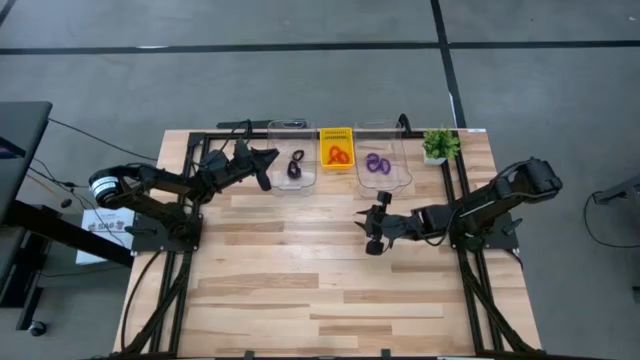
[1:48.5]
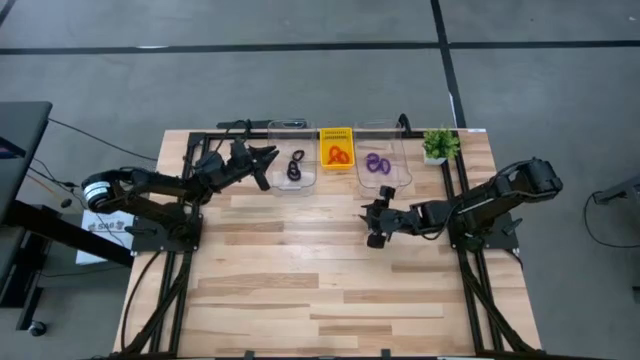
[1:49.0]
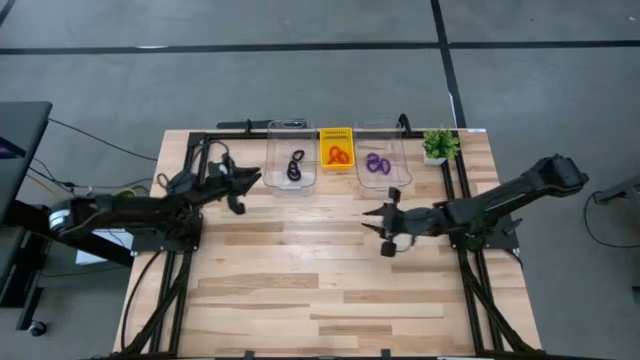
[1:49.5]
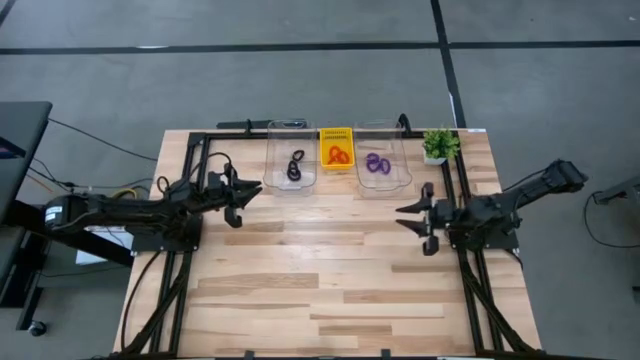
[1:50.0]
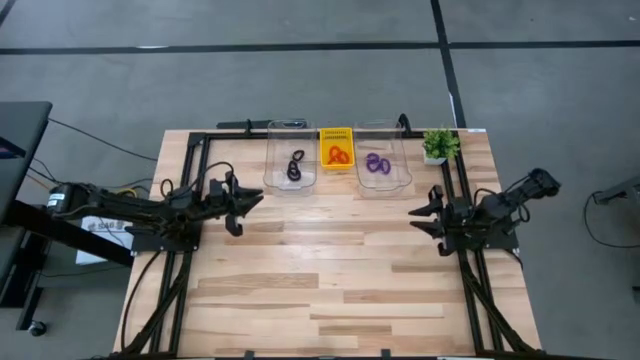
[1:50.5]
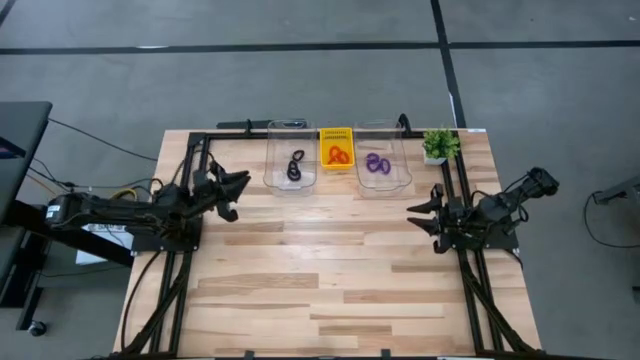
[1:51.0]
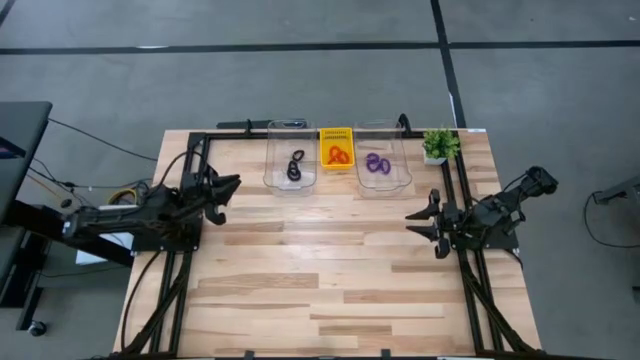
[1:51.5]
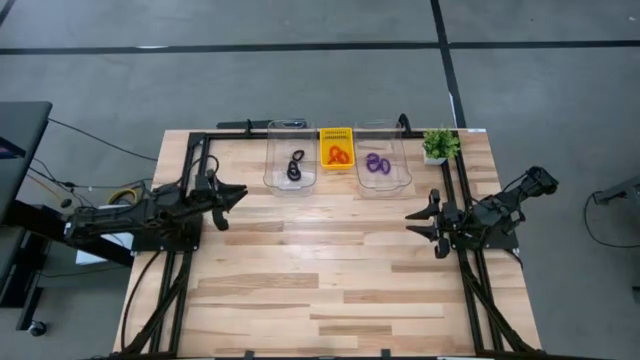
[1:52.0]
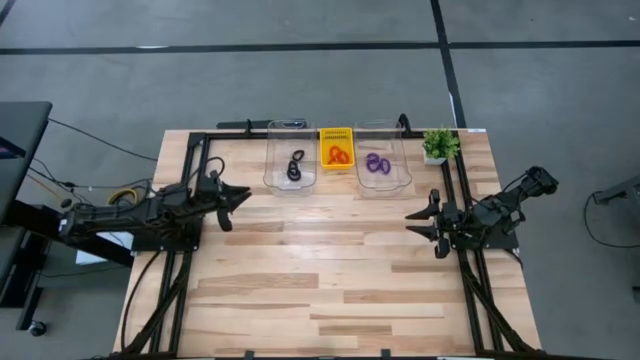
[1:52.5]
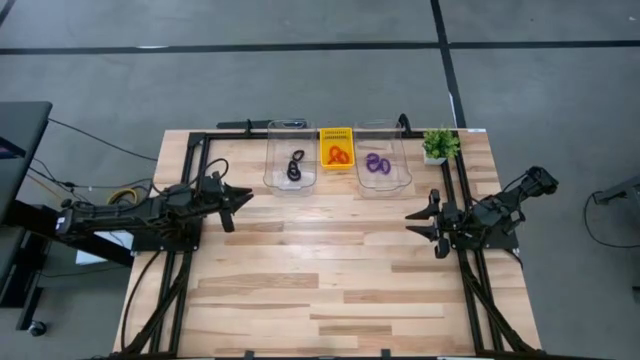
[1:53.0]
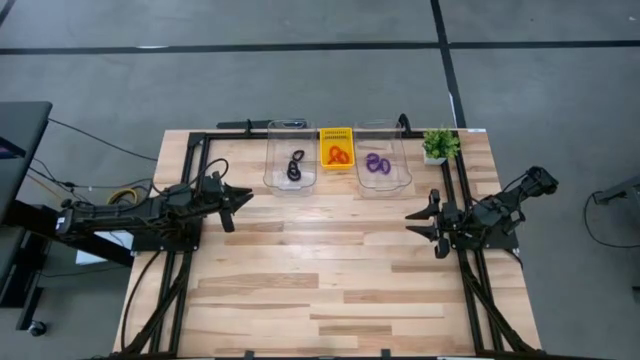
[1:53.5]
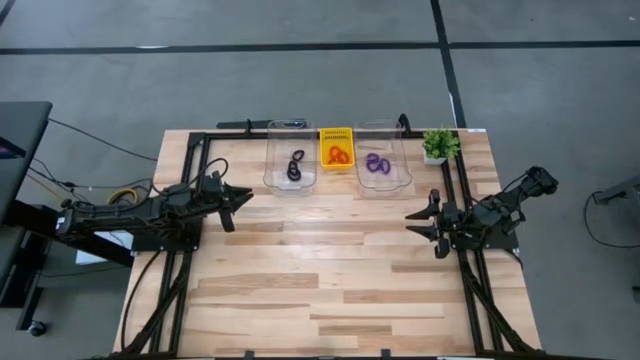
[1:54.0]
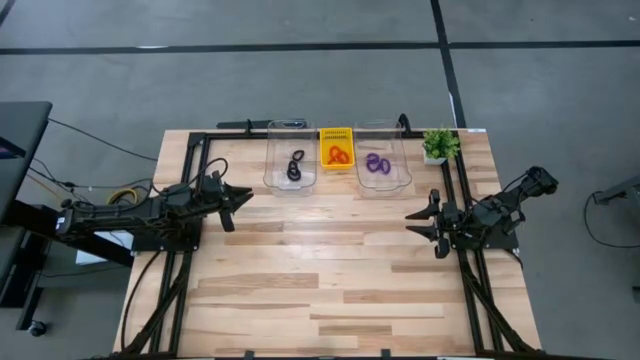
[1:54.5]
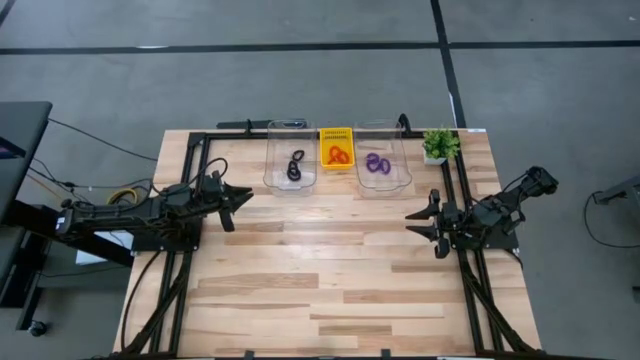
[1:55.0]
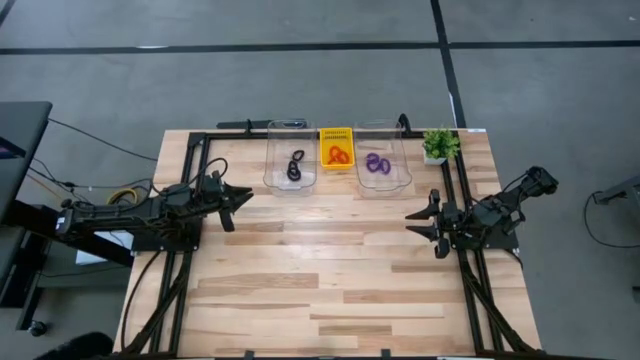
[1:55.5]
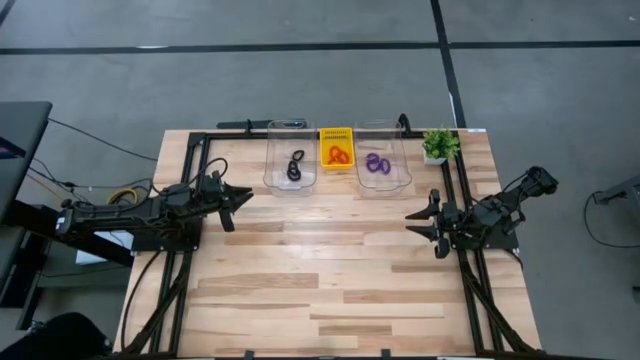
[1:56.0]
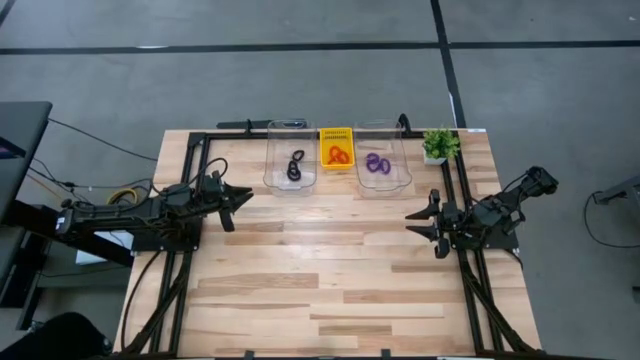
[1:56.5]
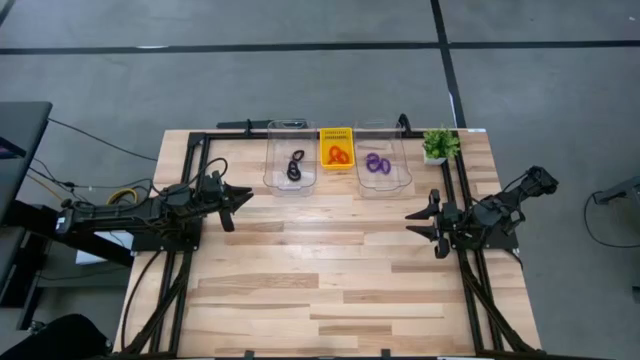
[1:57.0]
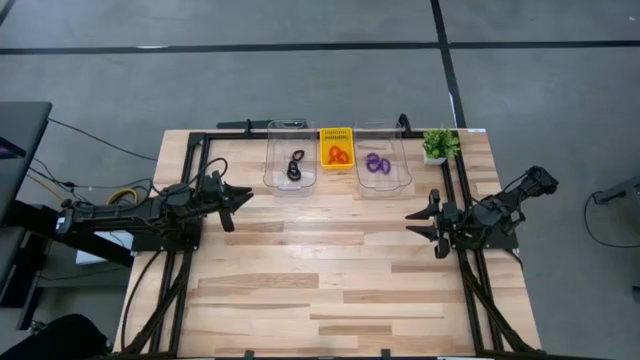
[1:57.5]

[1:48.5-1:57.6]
Task: Sort spring keychains
Return to Home Position

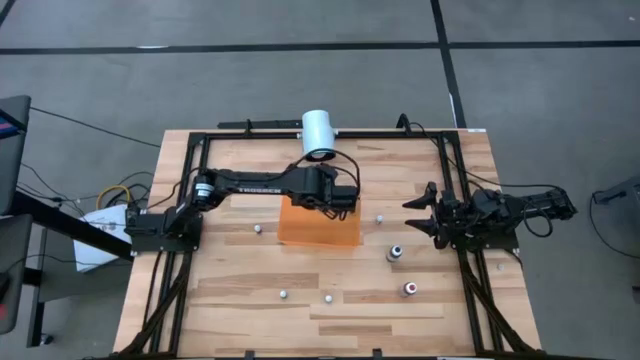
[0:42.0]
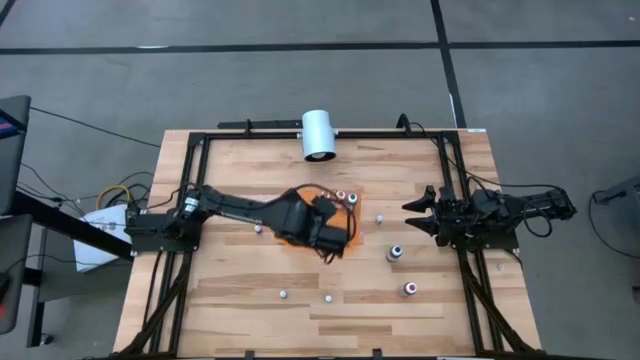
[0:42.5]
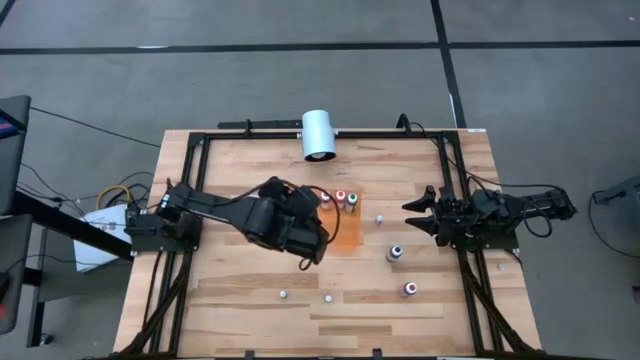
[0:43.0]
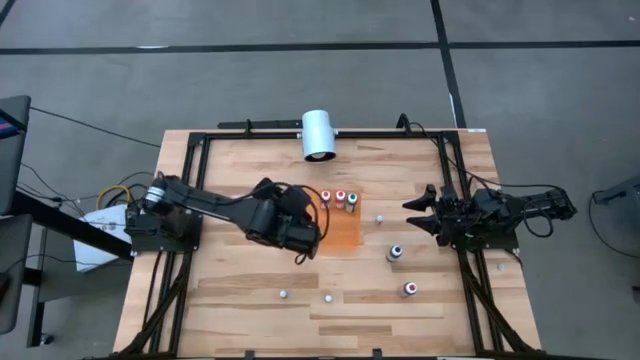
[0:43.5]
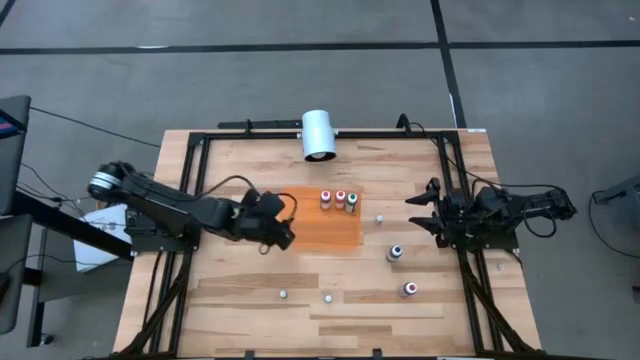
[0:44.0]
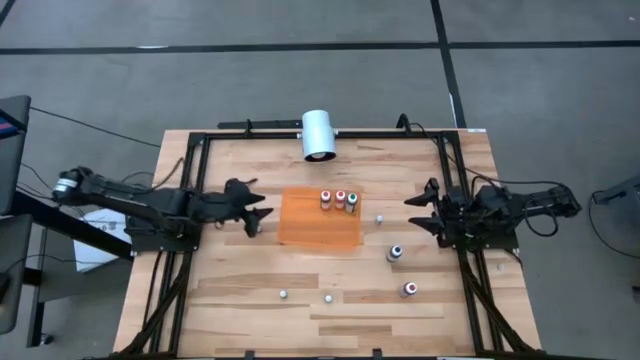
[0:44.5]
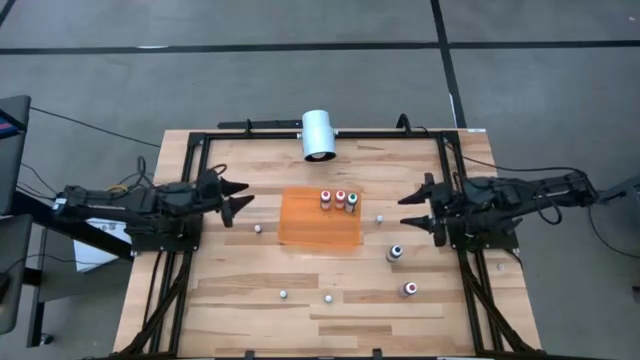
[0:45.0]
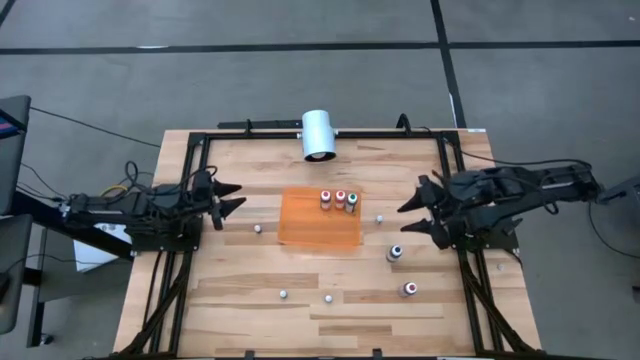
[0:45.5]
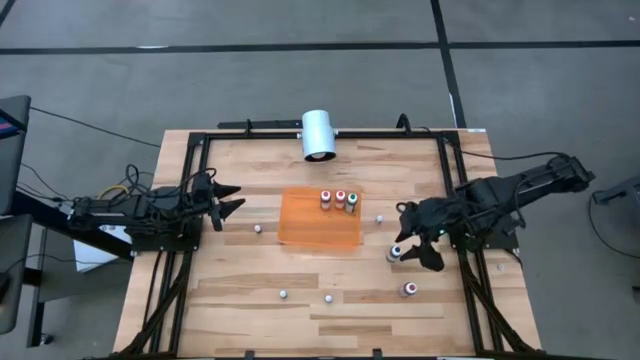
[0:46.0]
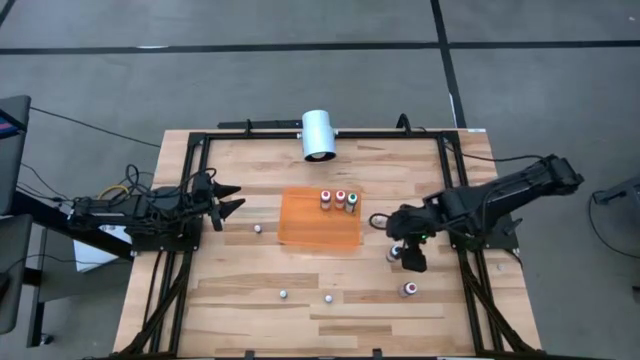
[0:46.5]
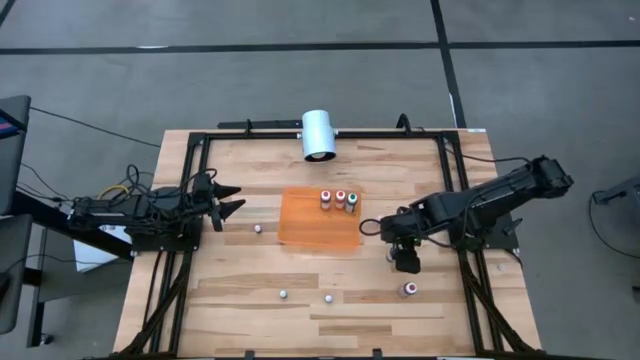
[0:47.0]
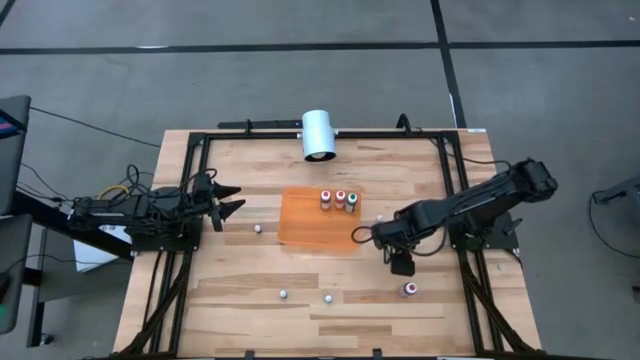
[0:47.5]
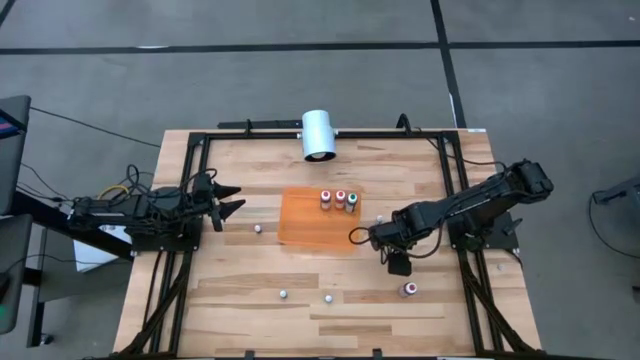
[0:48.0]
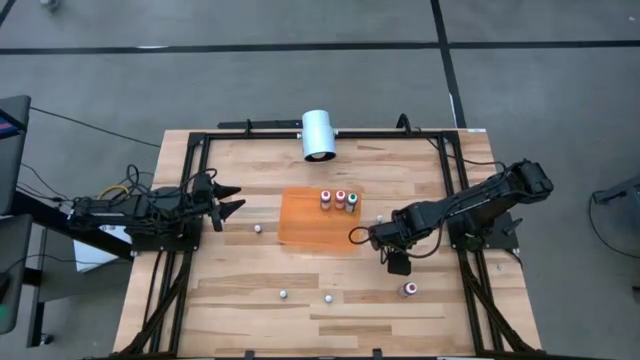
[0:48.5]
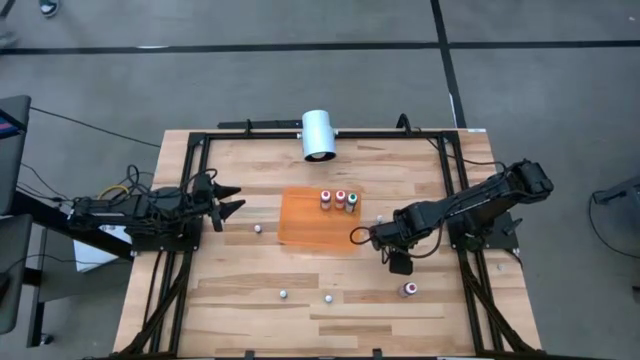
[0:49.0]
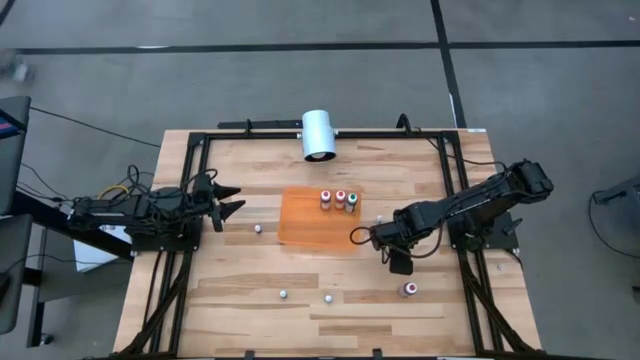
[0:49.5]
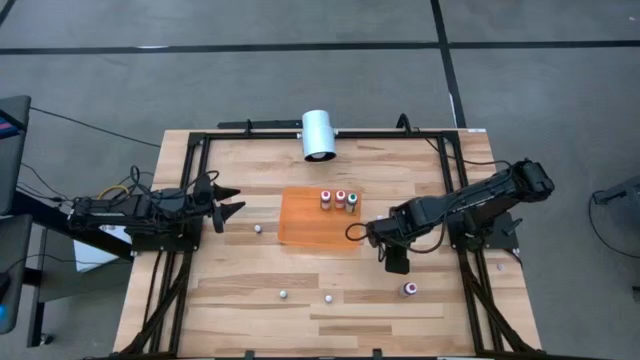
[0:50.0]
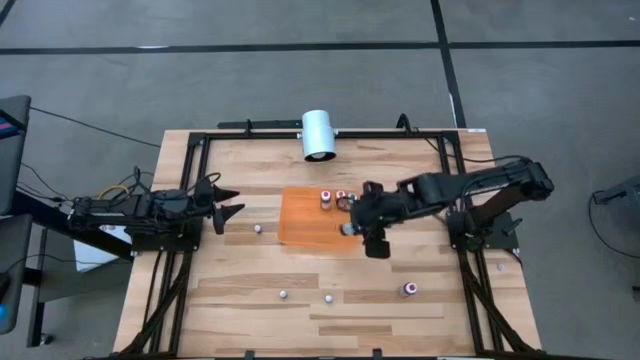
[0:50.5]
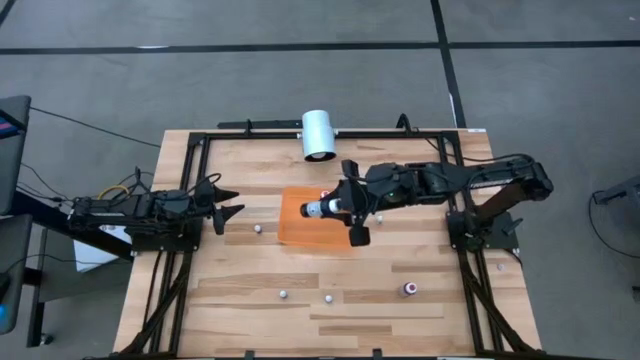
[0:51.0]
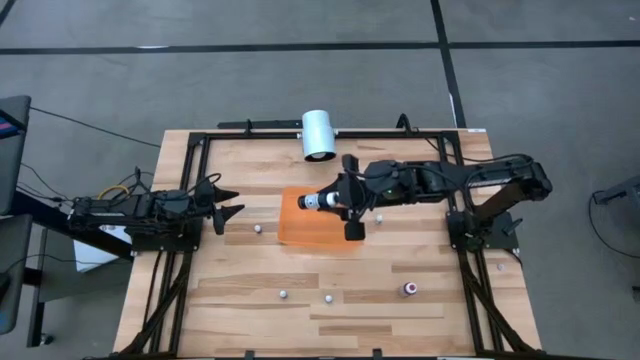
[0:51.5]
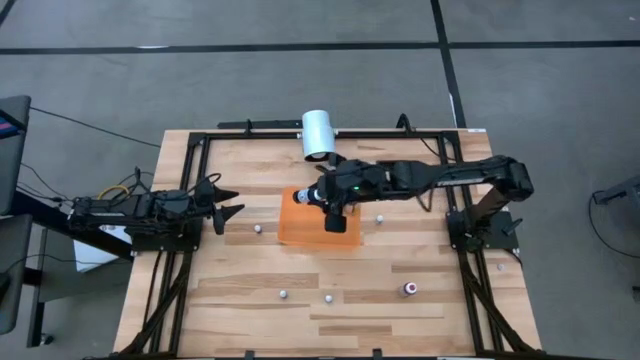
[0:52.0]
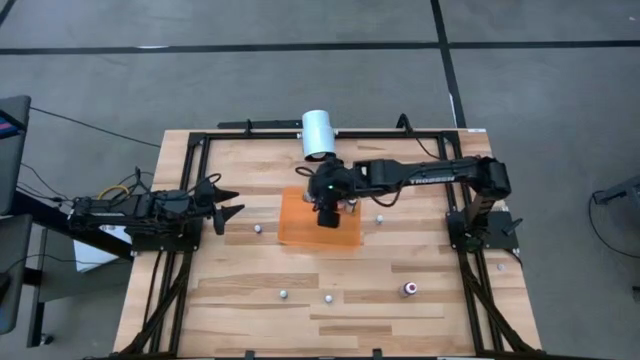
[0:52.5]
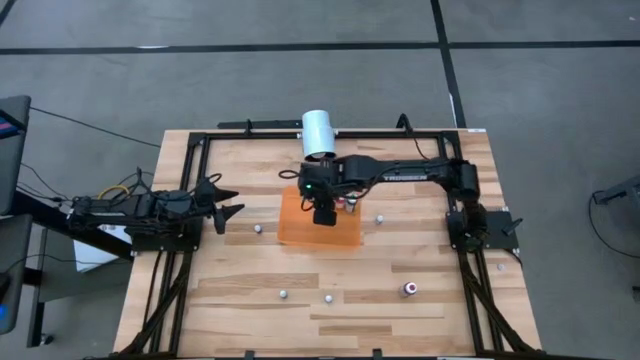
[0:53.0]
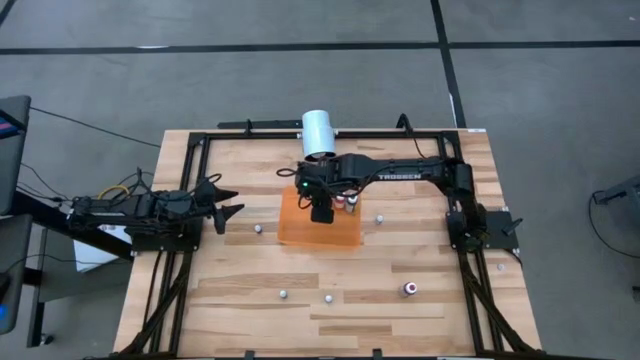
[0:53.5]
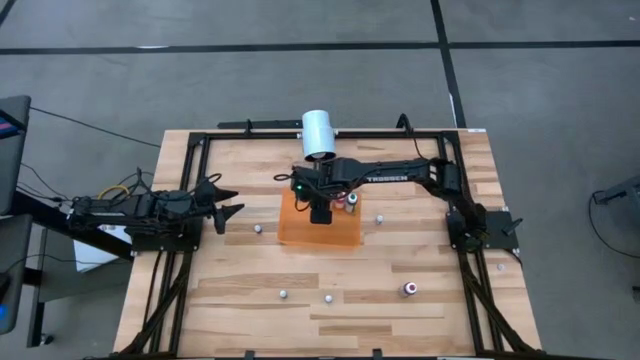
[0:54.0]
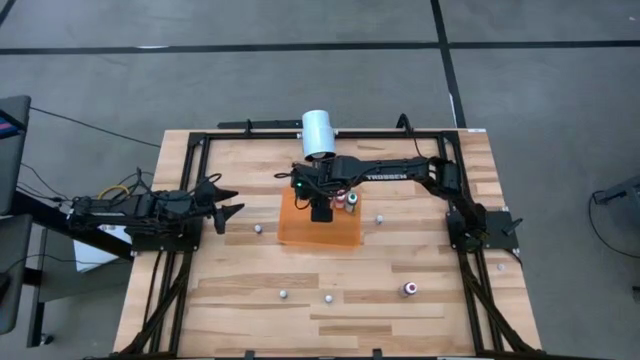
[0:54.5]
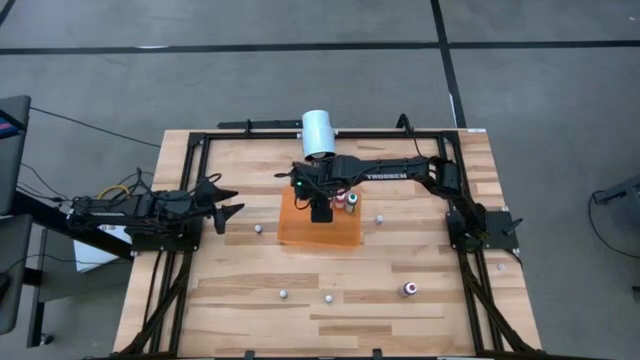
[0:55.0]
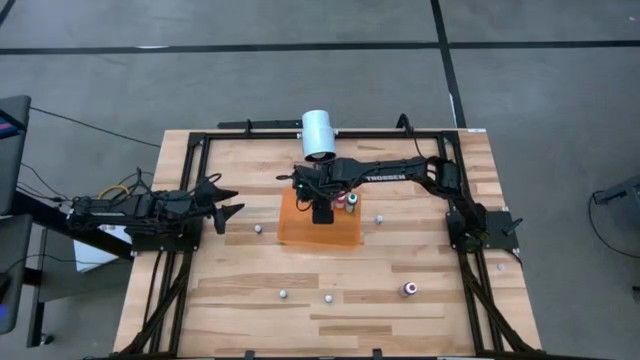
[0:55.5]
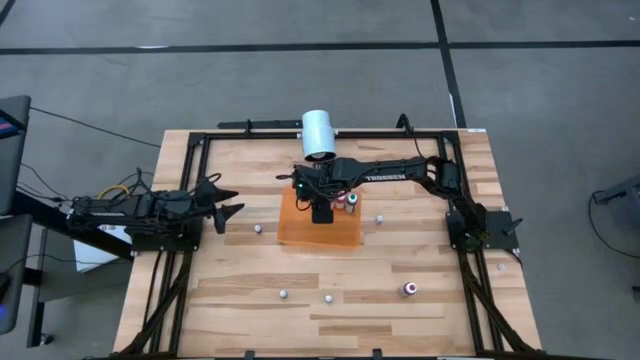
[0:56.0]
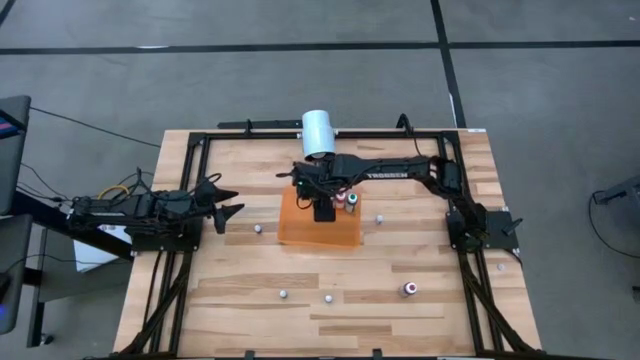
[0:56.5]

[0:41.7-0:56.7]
Task: Pick & Place food coloring
Put the large black food coloring bottle into the orange bin
